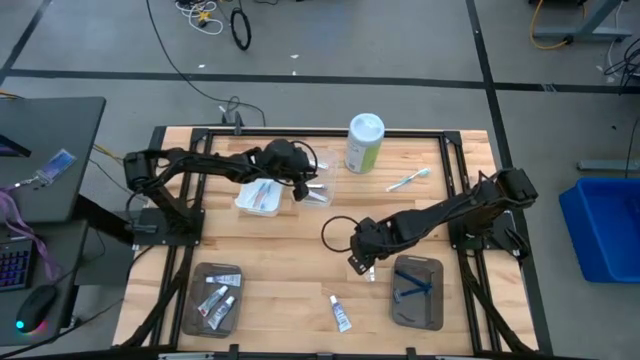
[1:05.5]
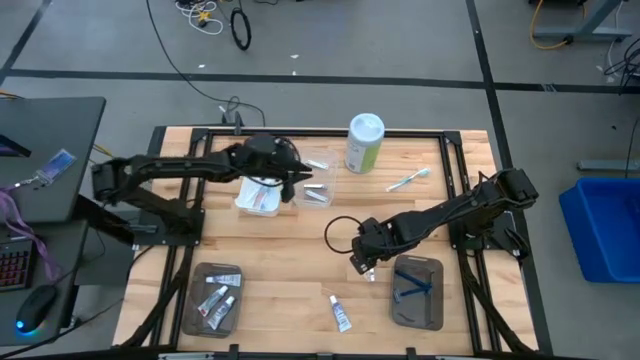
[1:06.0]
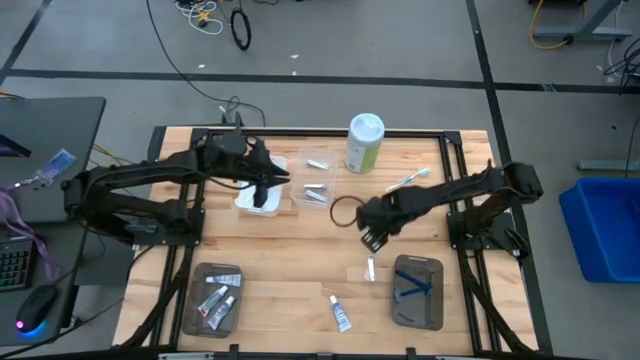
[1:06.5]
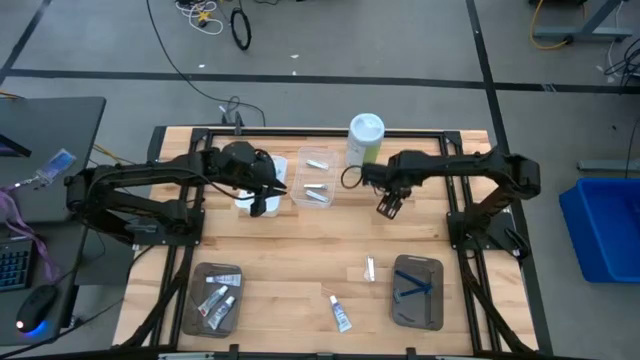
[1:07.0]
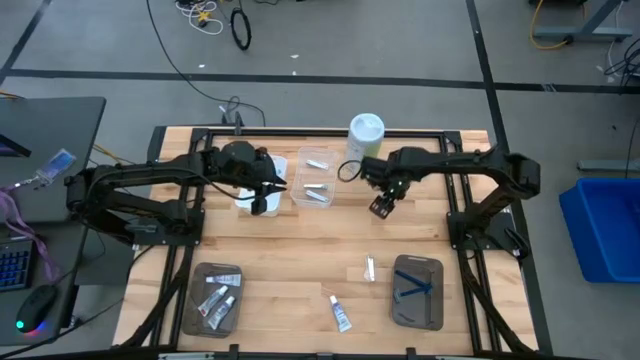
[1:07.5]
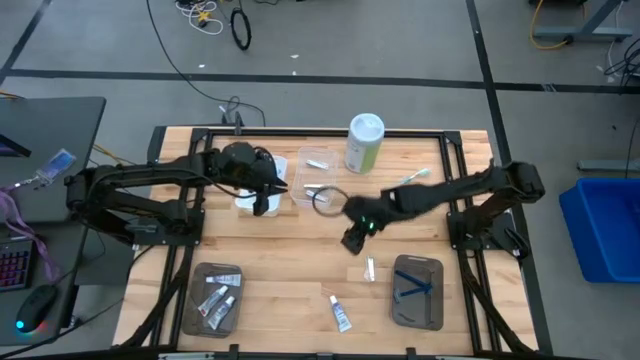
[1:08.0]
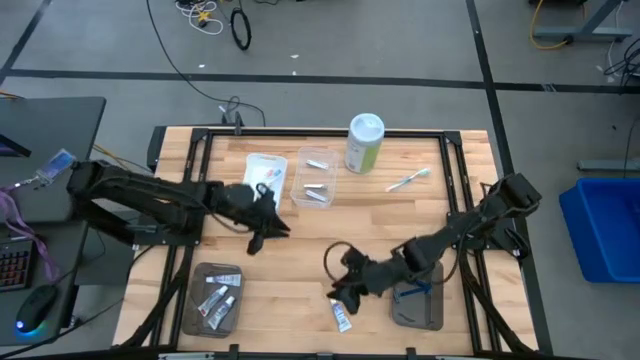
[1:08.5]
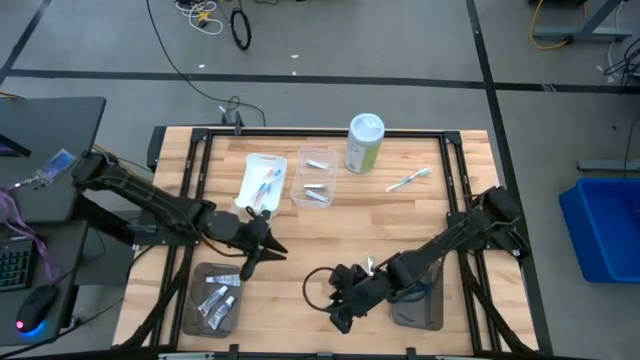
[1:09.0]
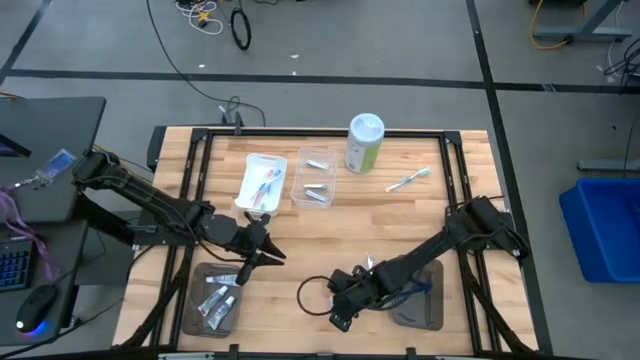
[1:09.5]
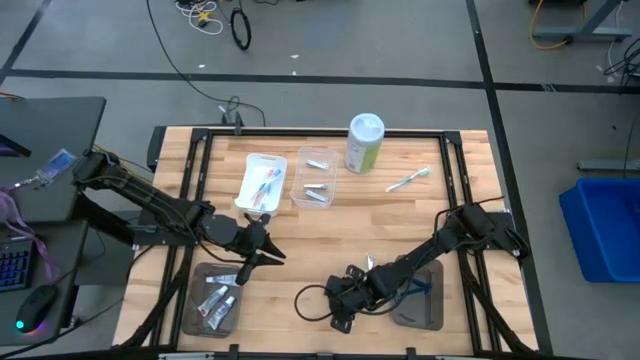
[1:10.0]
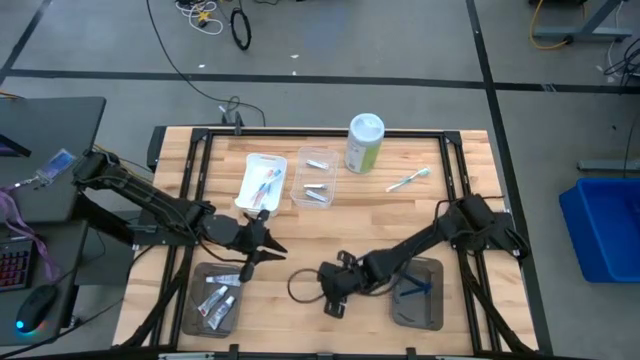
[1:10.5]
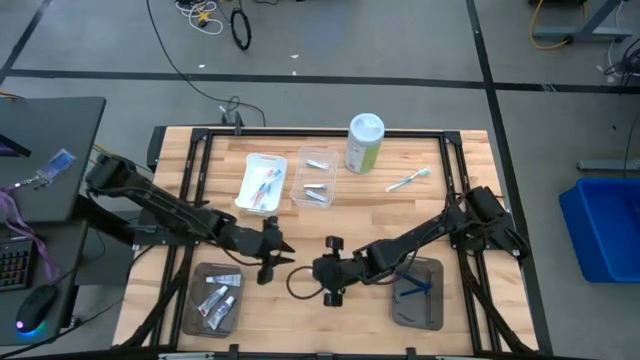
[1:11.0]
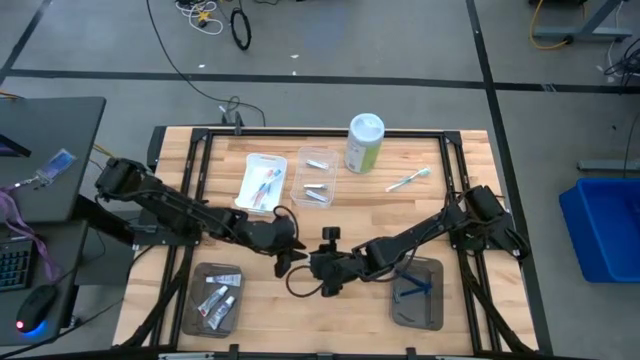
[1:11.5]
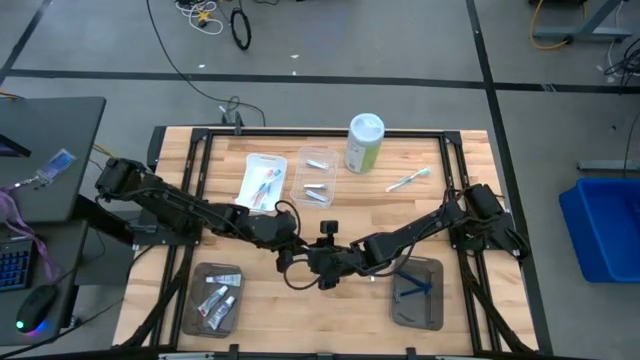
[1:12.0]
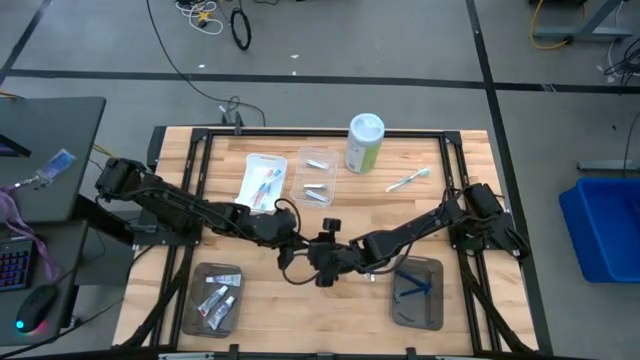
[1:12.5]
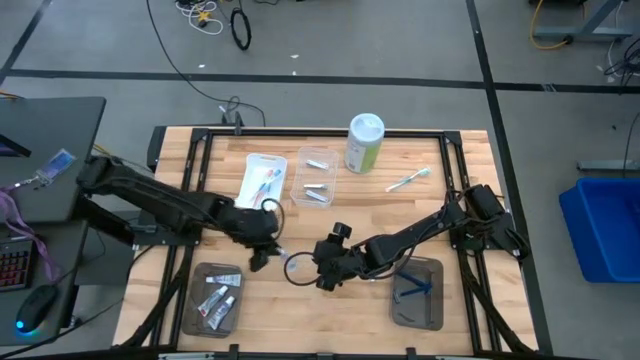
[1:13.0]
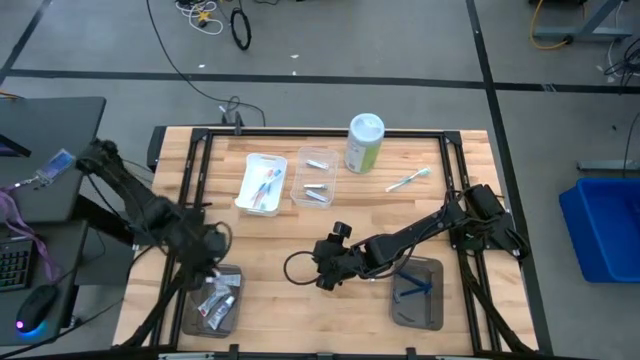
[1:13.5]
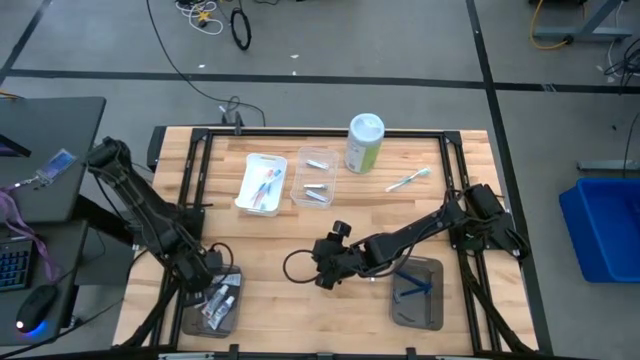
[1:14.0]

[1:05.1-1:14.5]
Task: Pick & Place Travel size toiletries
Put the white toothpaste into the left black bin

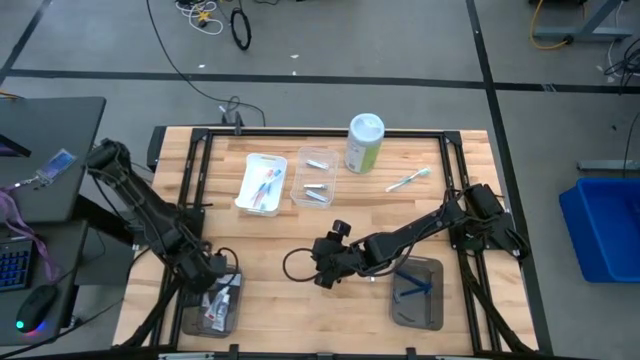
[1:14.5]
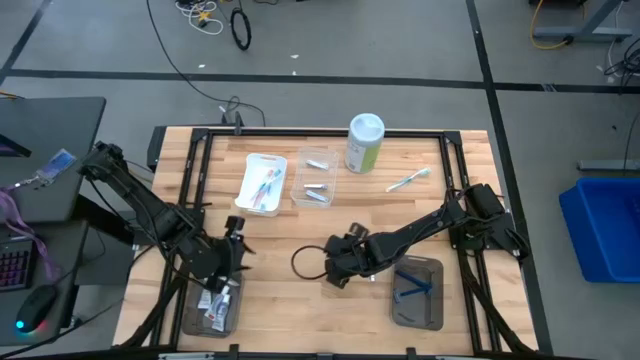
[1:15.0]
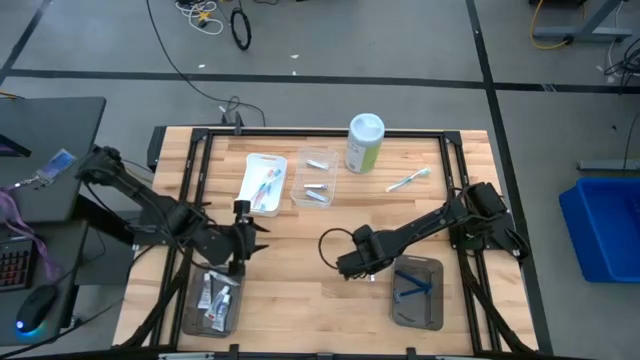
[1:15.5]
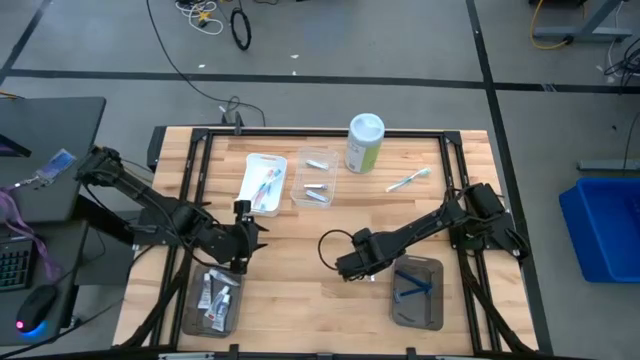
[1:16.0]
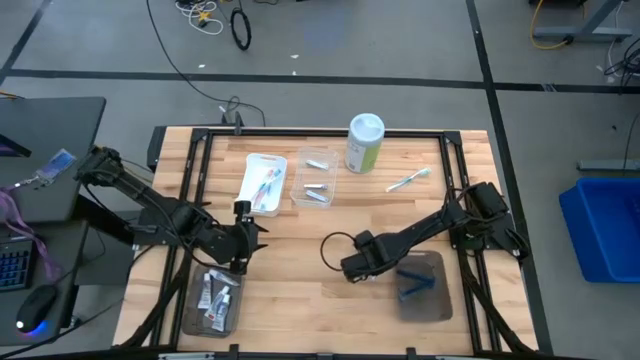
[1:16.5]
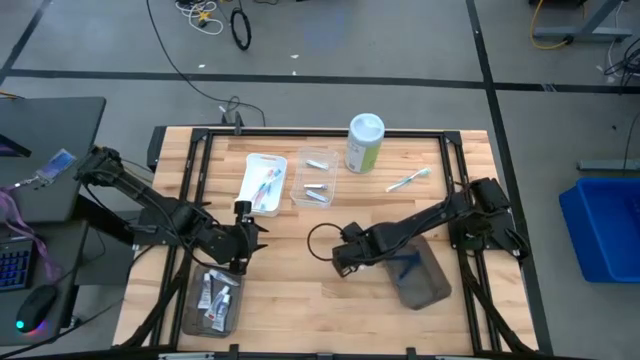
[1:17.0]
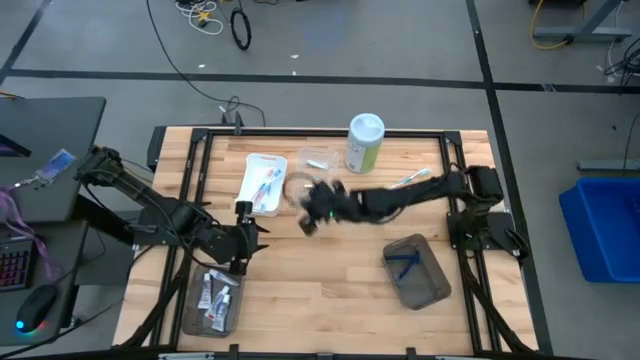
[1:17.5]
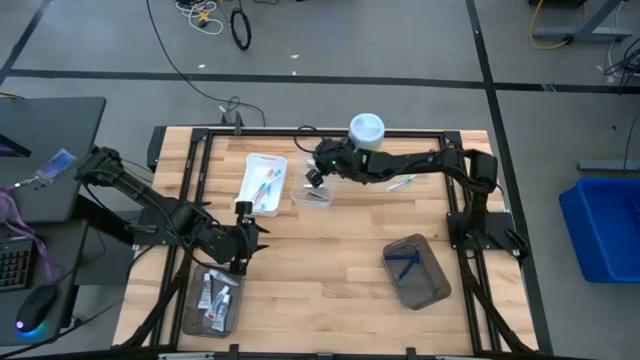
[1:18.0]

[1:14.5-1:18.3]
Put the nail cutter into the transparent bin

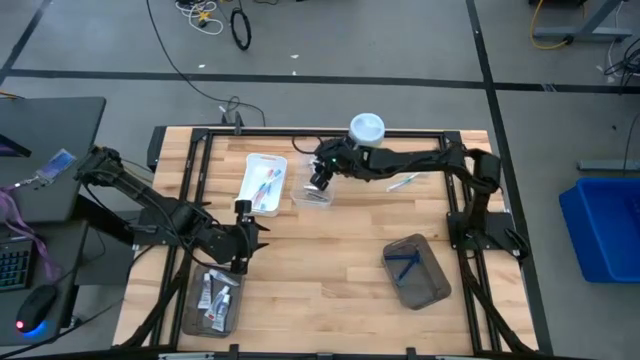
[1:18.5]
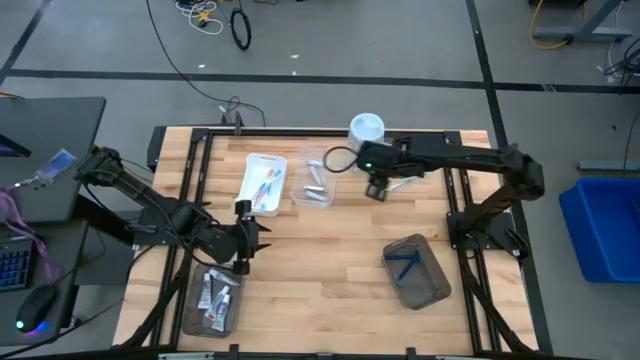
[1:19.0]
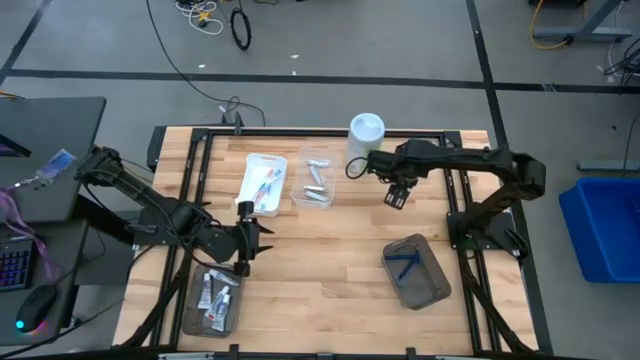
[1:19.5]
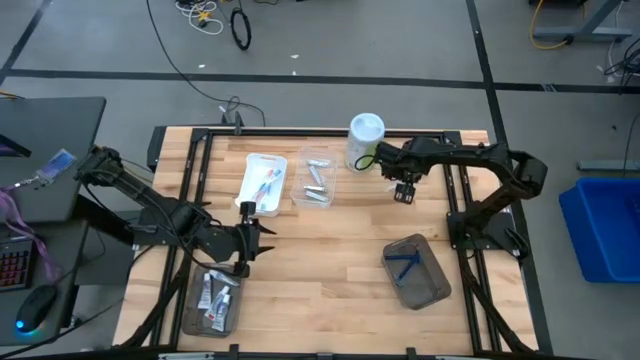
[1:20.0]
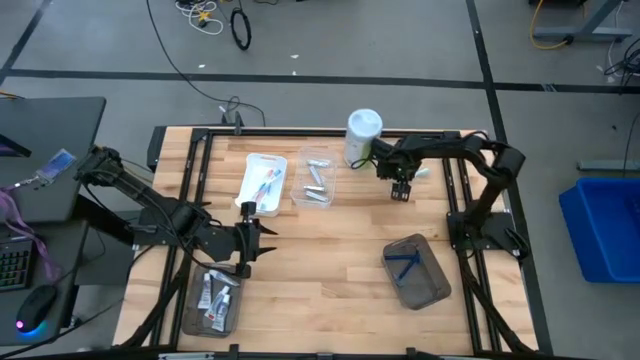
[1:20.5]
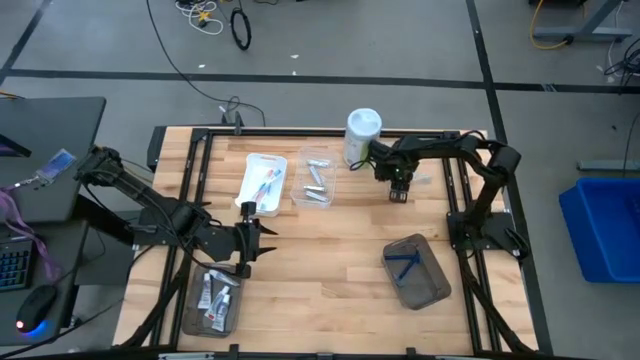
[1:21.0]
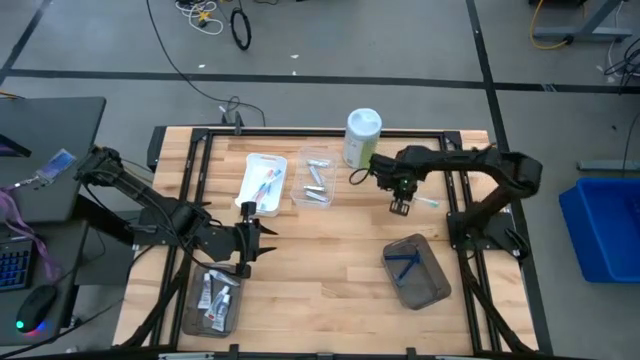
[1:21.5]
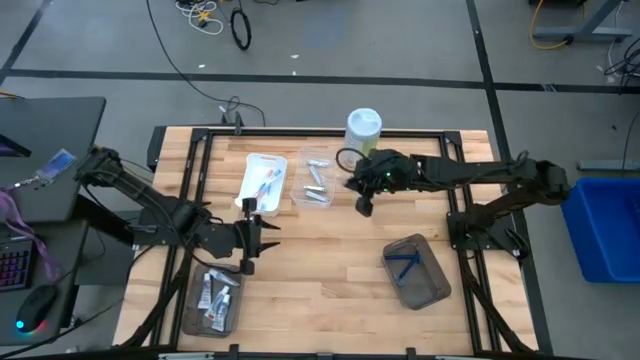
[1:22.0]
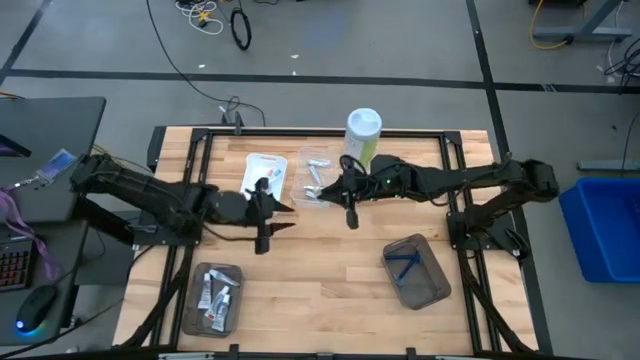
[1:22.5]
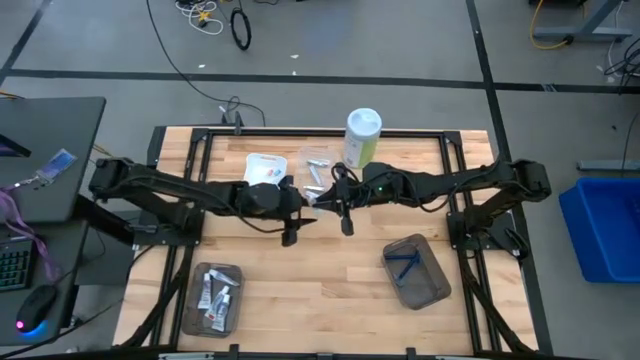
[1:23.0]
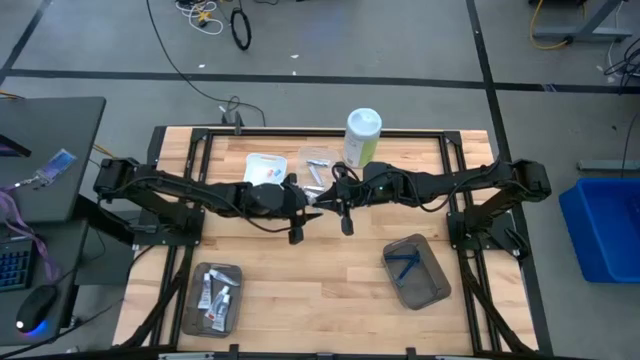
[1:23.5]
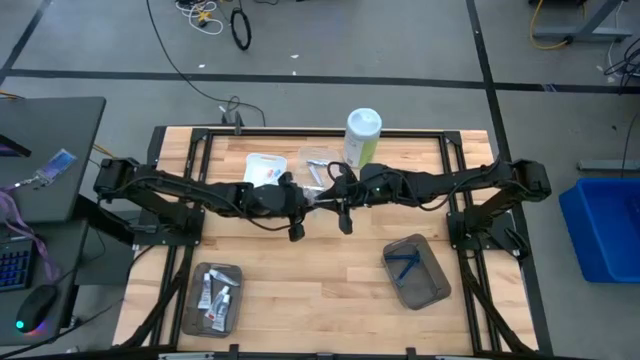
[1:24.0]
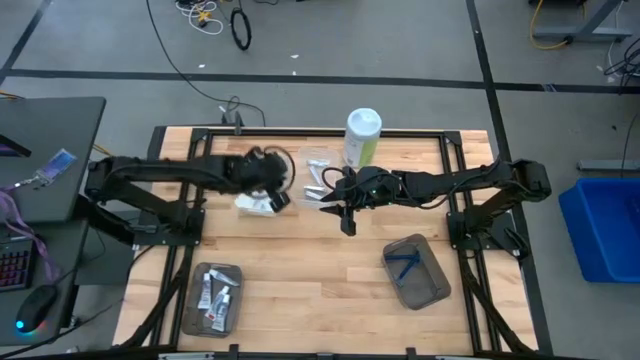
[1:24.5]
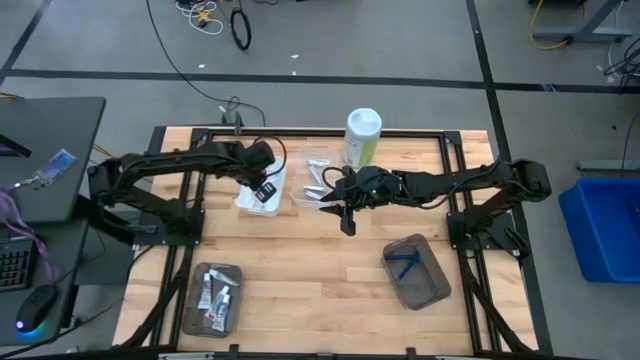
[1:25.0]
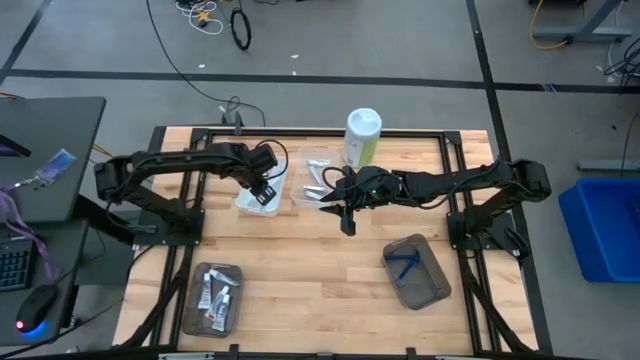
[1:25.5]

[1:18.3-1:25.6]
Put the green and white toothbrush into the white bin

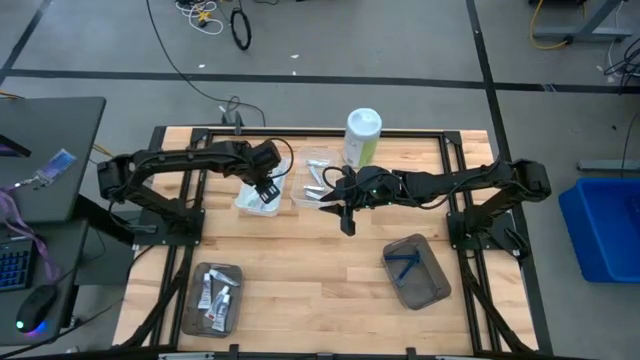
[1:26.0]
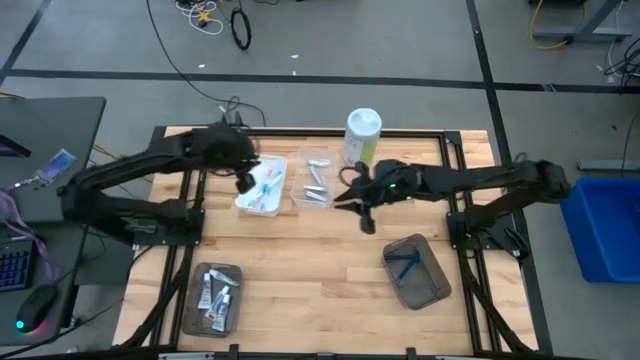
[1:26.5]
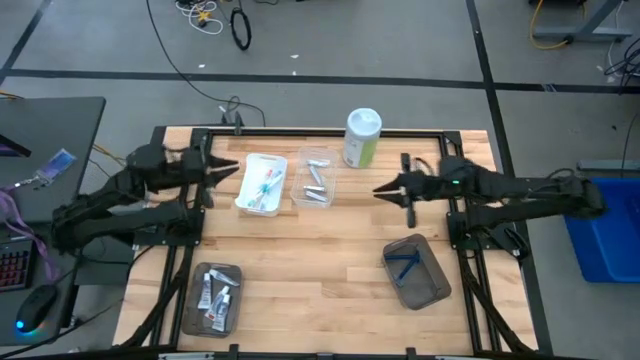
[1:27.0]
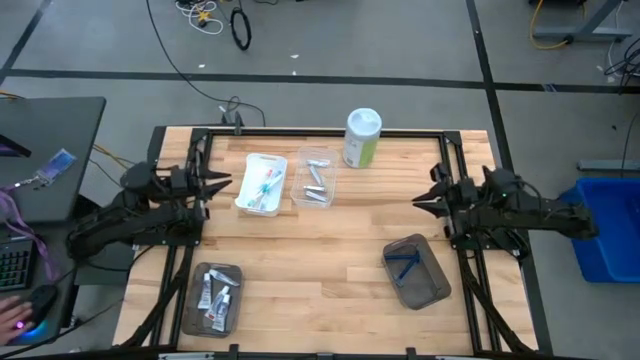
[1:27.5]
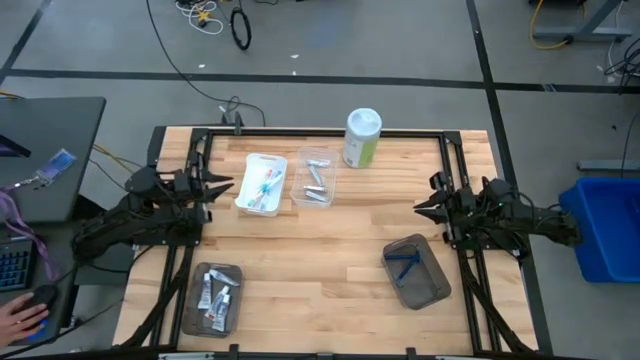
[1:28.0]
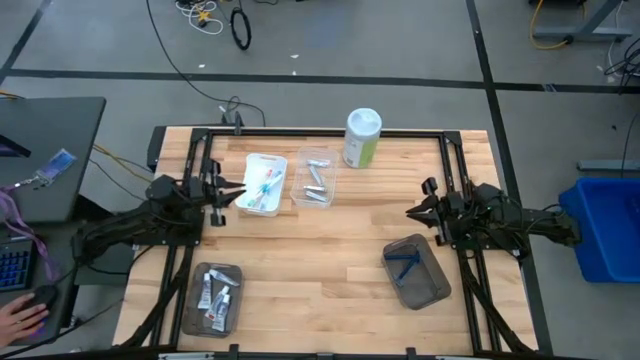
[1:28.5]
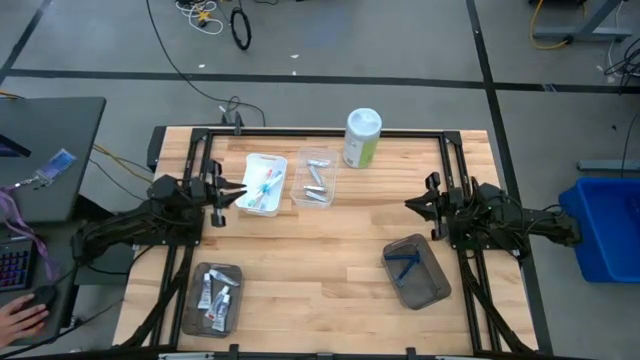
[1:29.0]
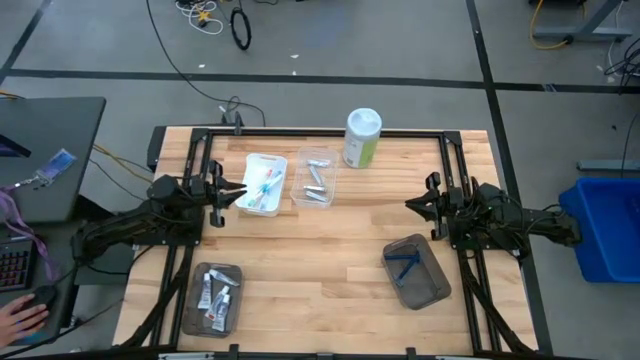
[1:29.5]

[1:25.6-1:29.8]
Return to Home Position
